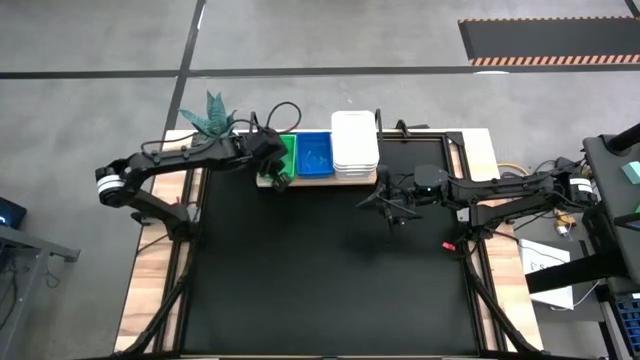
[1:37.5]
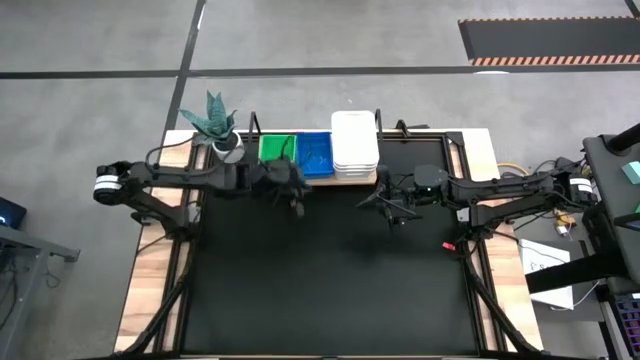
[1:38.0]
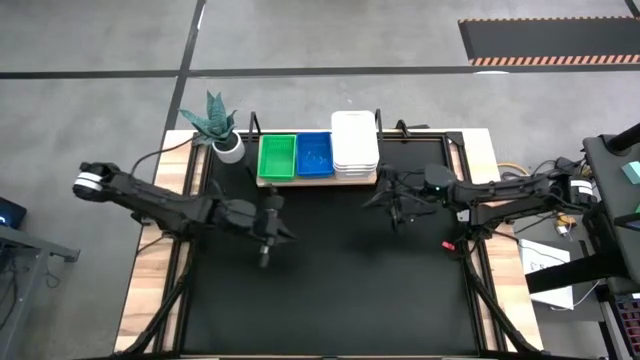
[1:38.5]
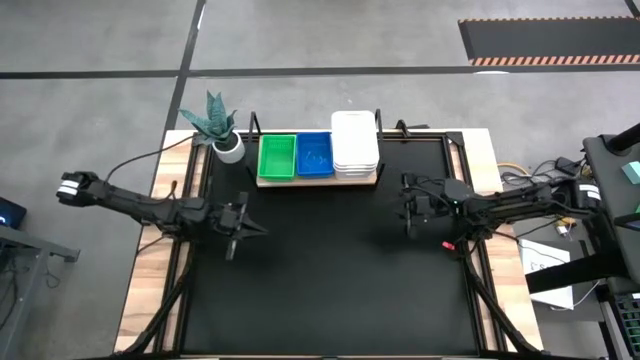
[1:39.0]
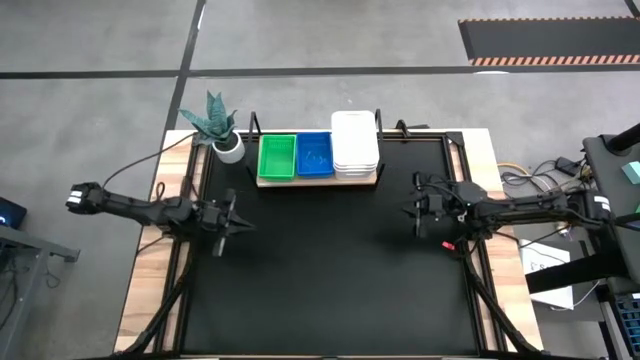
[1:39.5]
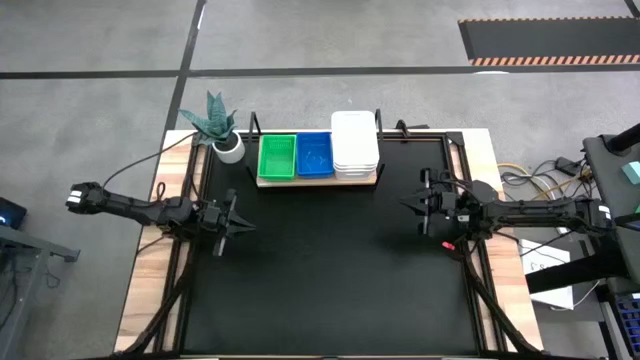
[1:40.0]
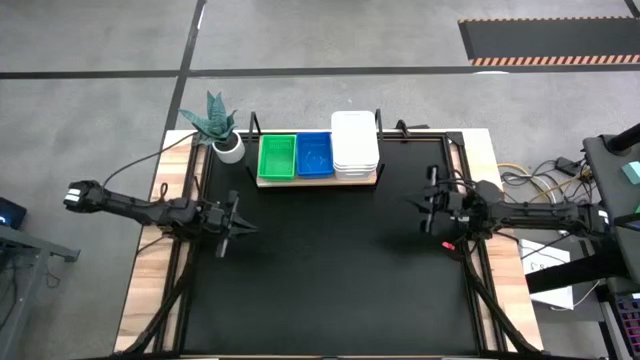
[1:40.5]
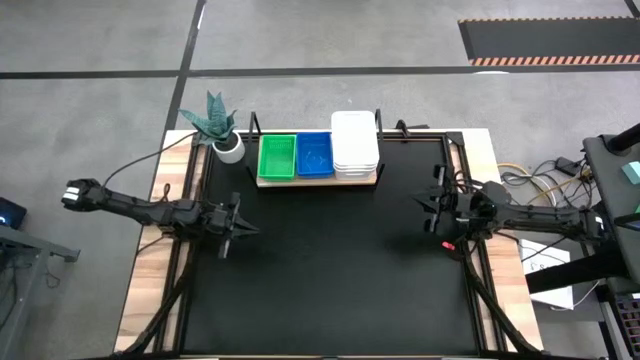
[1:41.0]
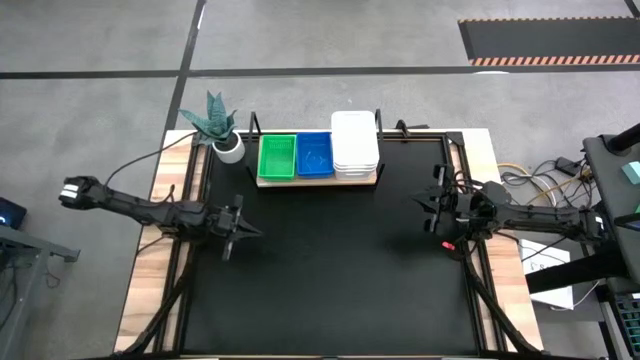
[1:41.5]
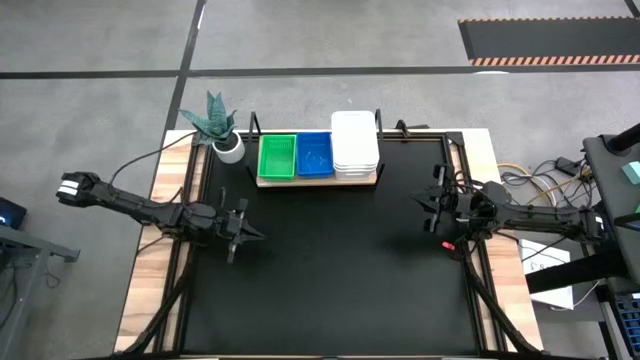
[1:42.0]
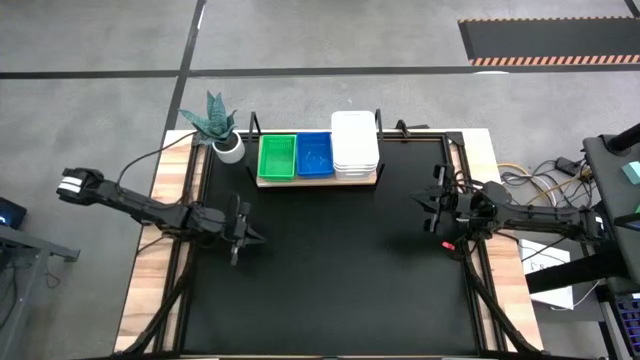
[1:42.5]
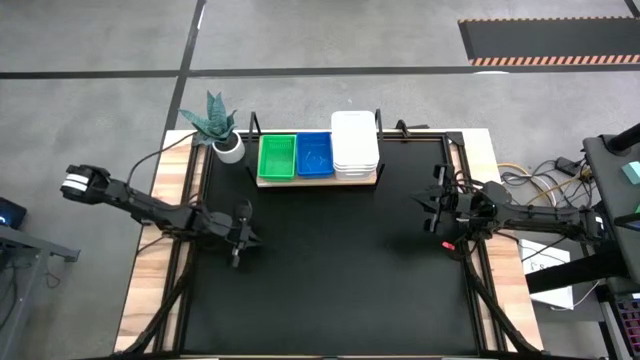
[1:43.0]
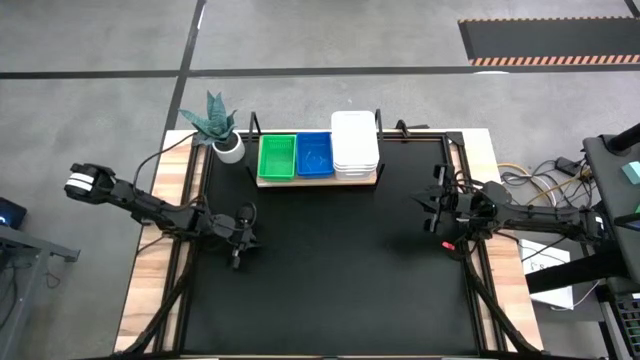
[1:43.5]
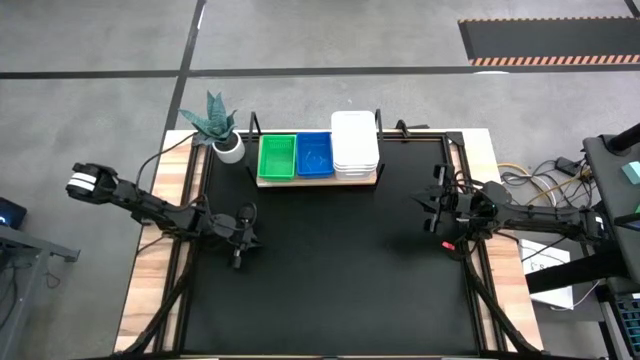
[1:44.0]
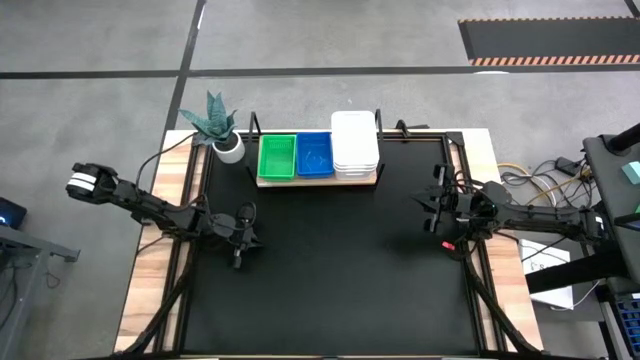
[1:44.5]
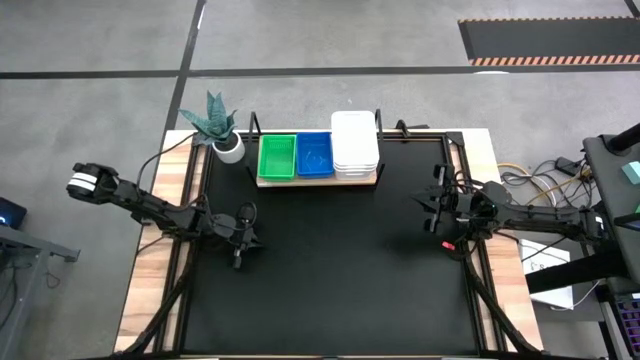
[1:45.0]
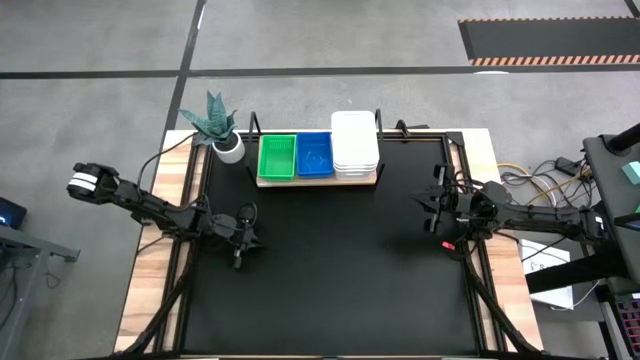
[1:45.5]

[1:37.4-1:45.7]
Task: Stack baskets on shelf by color
Return to Home Position

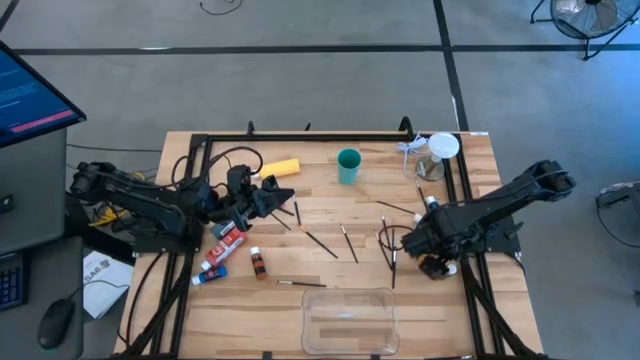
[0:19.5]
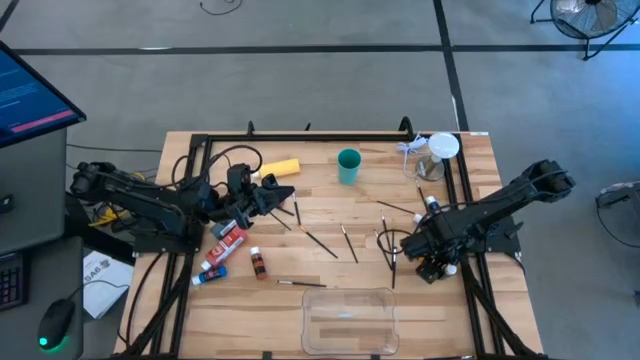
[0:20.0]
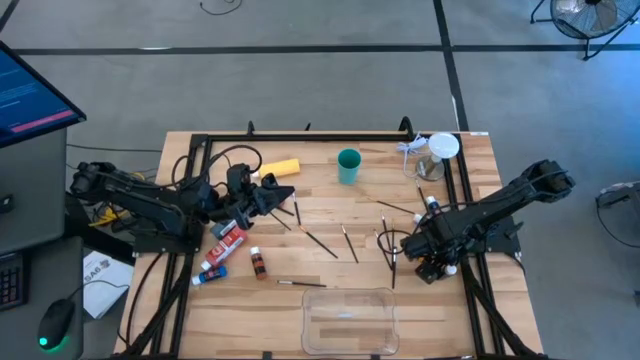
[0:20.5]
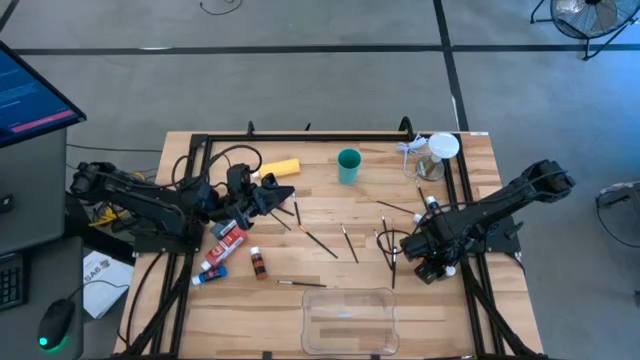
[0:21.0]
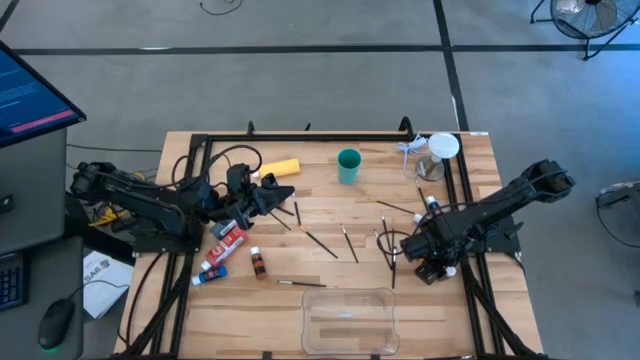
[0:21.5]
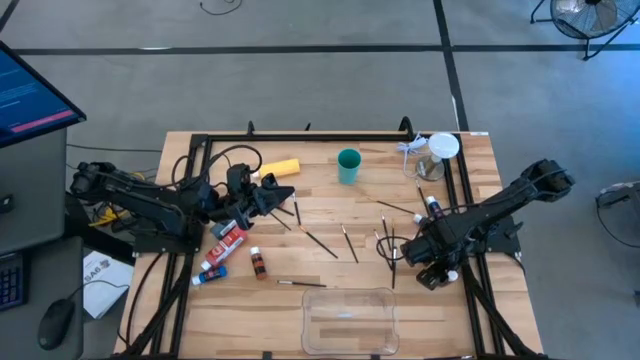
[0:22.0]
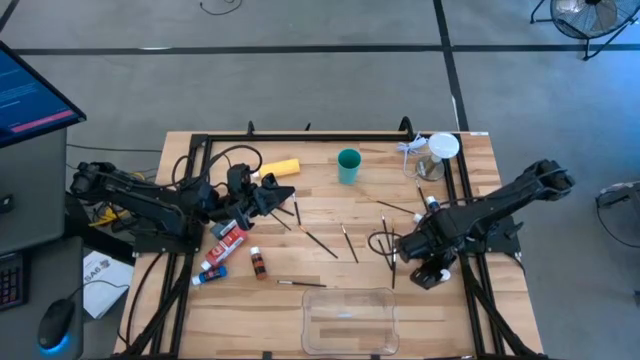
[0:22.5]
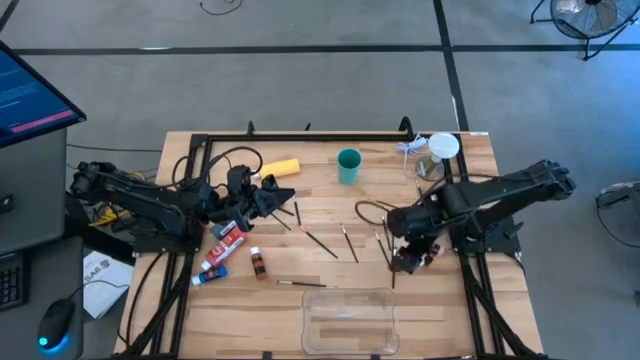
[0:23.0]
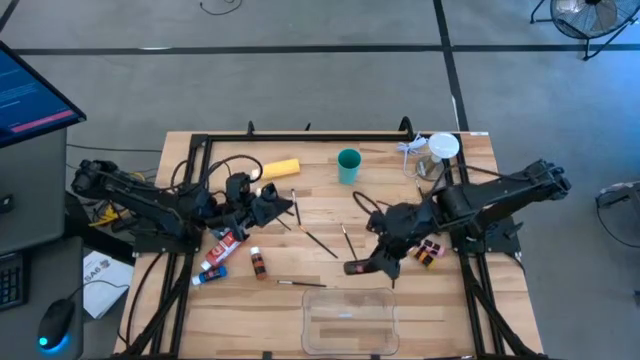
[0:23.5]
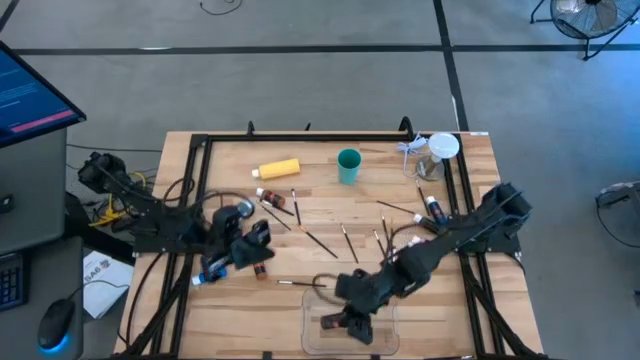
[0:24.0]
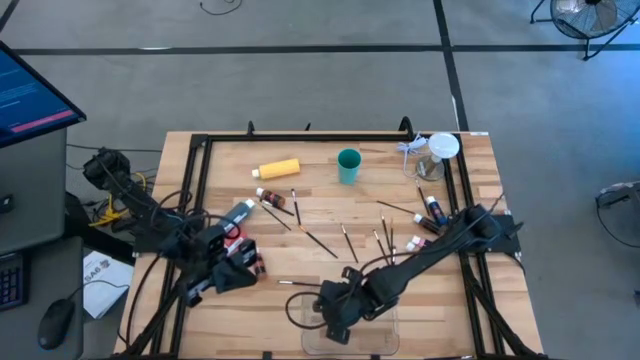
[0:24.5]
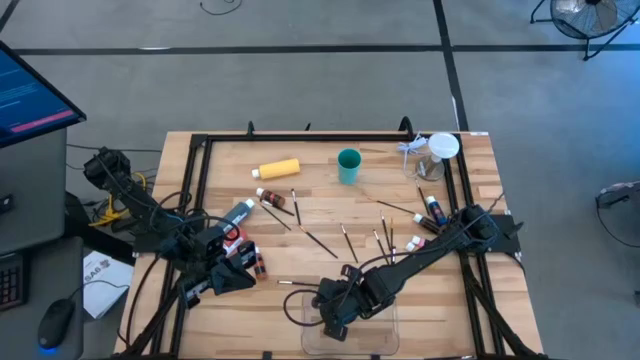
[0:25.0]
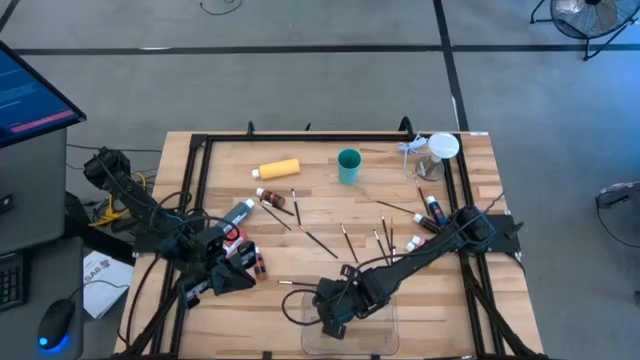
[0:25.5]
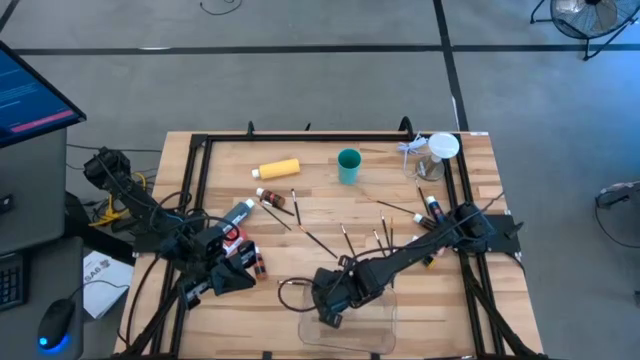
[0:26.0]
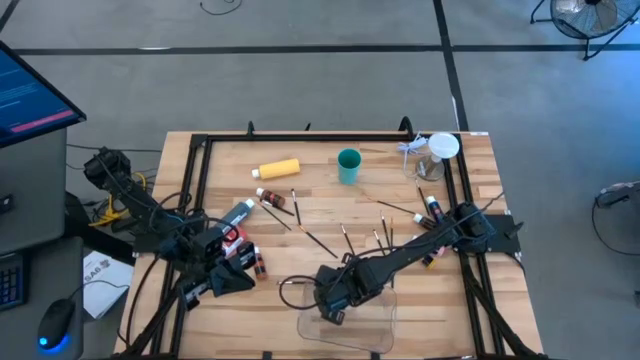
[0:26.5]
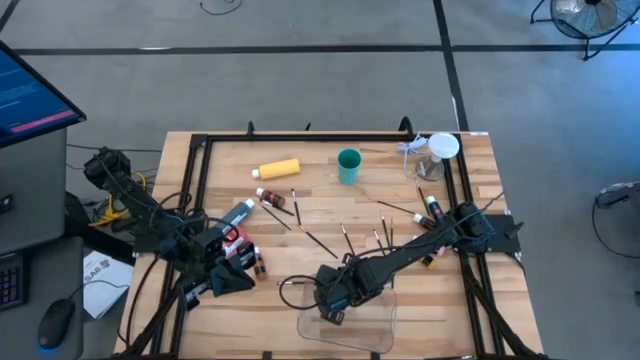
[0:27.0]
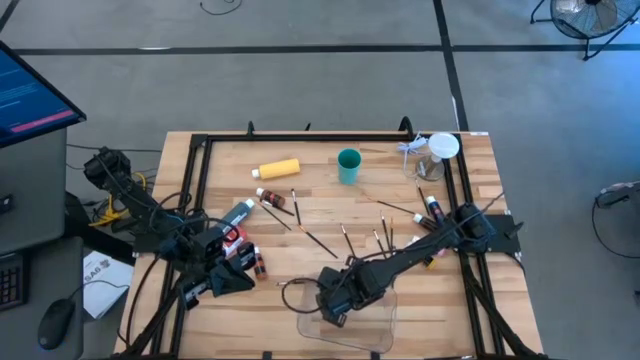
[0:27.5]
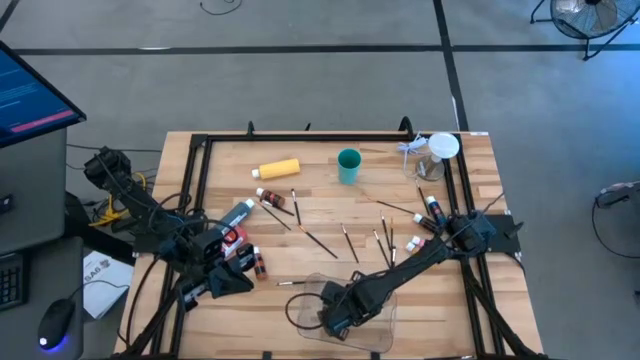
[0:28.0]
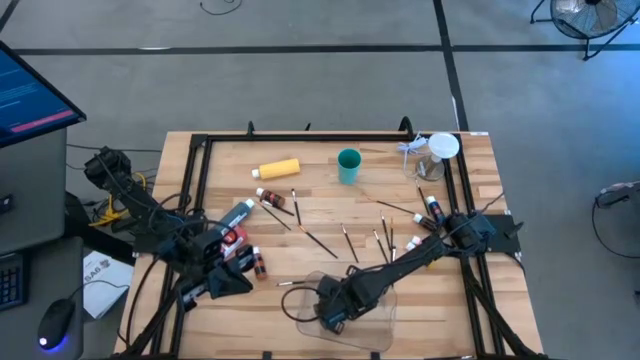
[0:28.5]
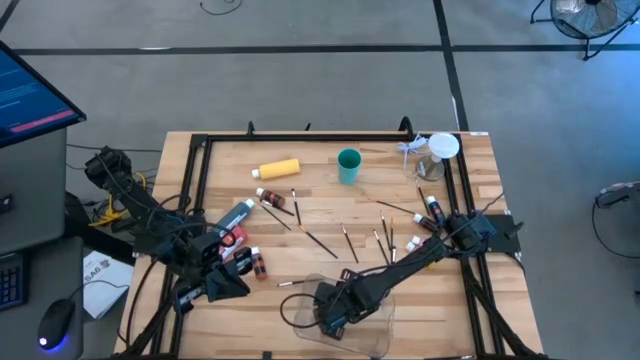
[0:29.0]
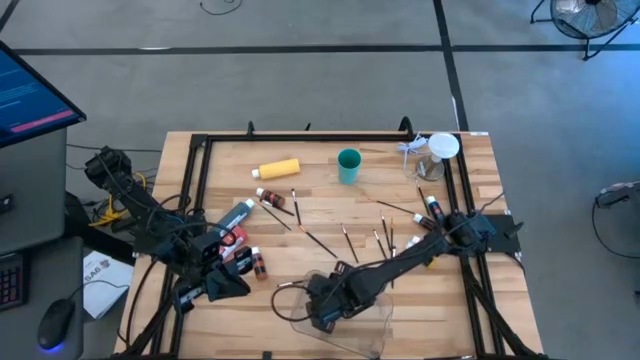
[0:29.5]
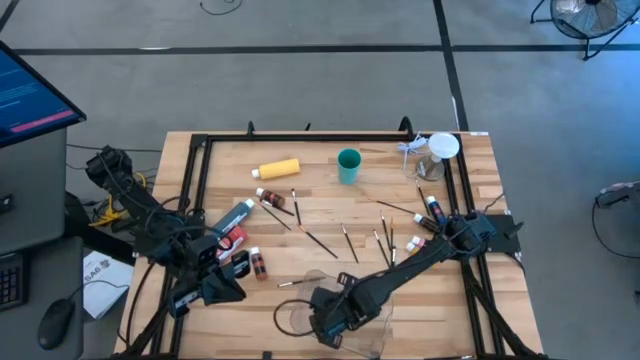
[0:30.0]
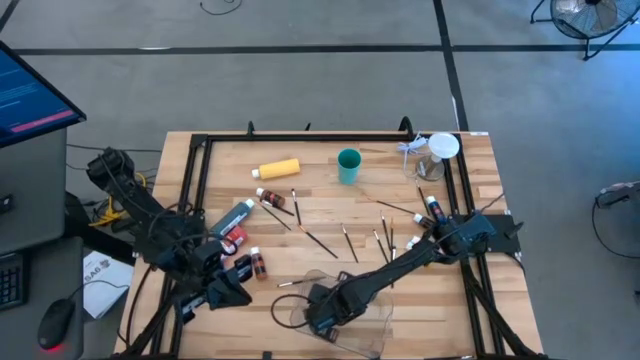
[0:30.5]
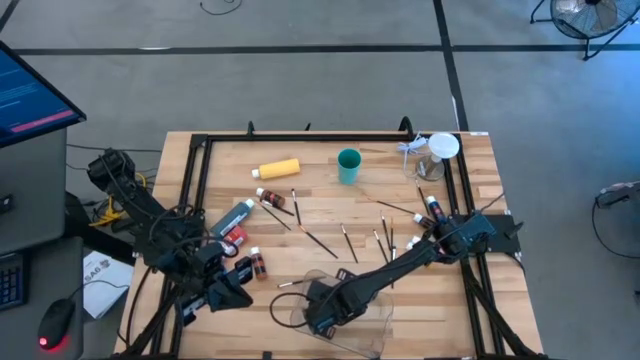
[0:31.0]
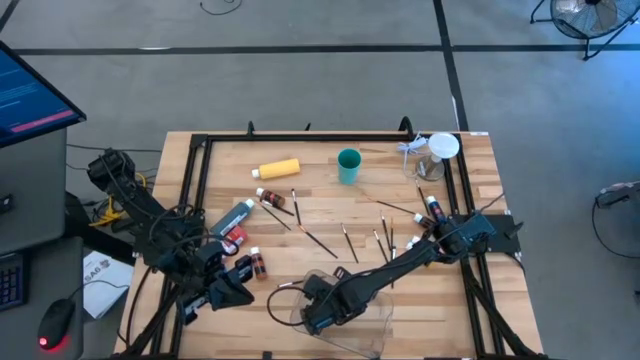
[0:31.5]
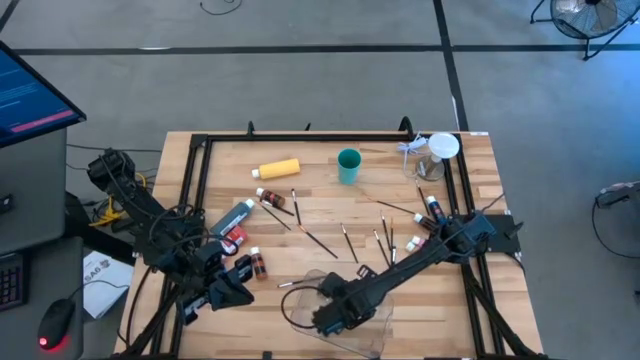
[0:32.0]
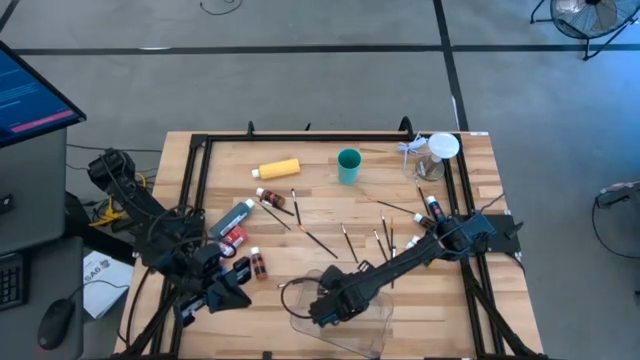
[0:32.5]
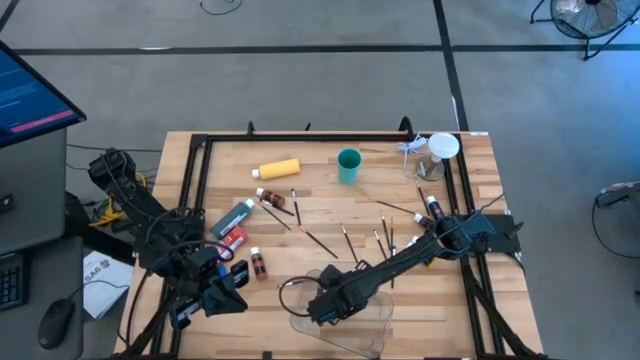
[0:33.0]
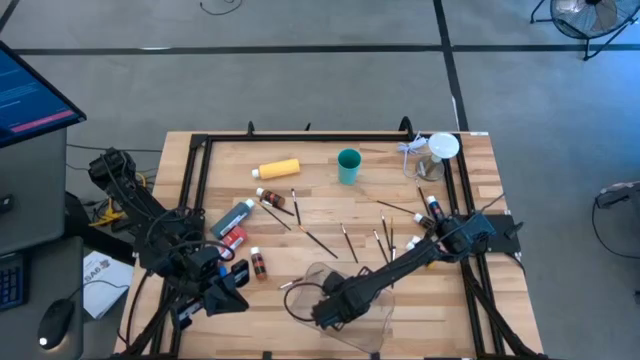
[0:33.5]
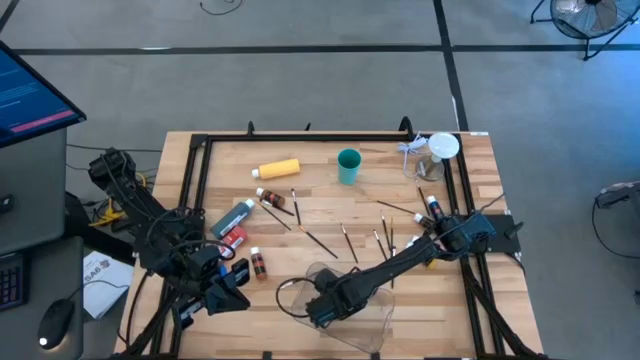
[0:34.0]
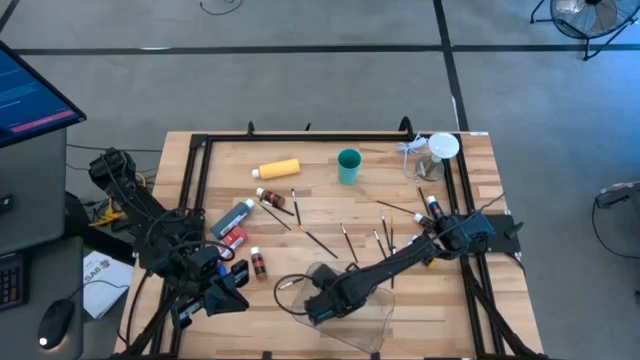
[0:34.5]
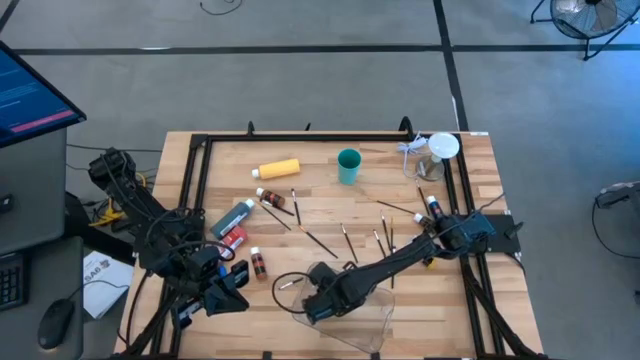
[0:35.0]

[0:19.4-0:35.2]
Task: Pick & Place Paint Supplies
Put the black paint bottle into the transparent bin
